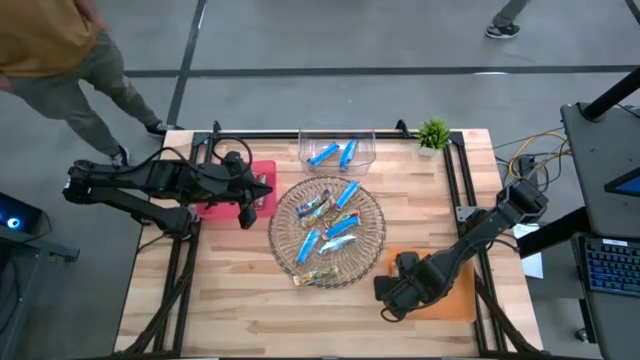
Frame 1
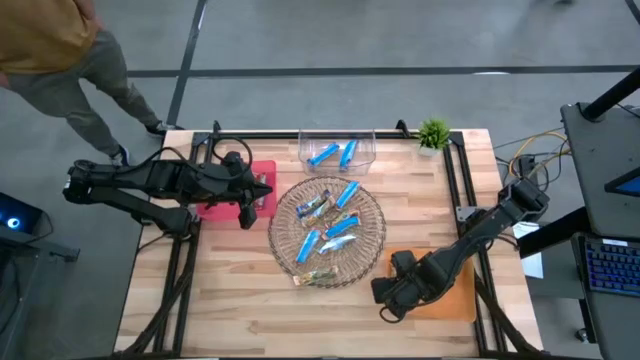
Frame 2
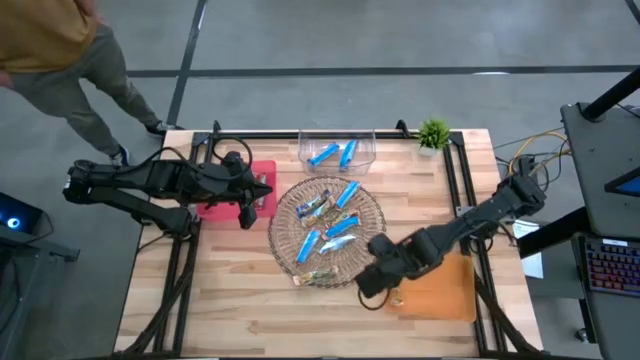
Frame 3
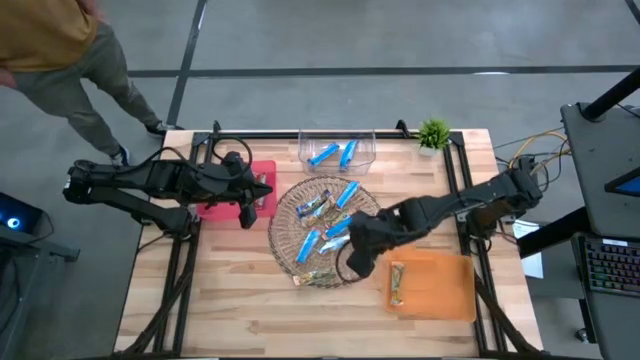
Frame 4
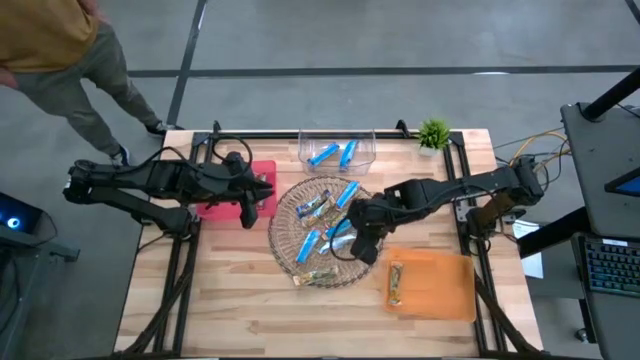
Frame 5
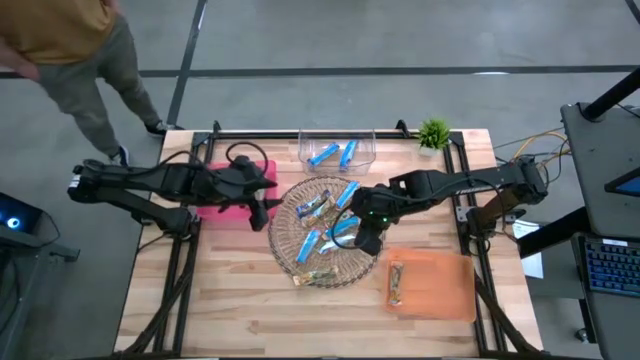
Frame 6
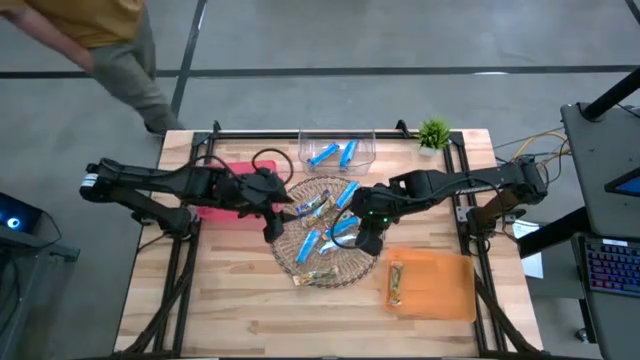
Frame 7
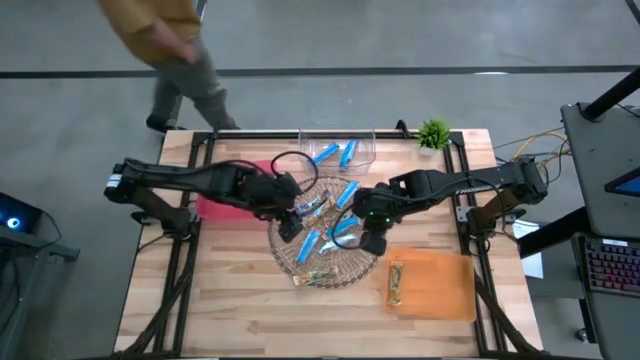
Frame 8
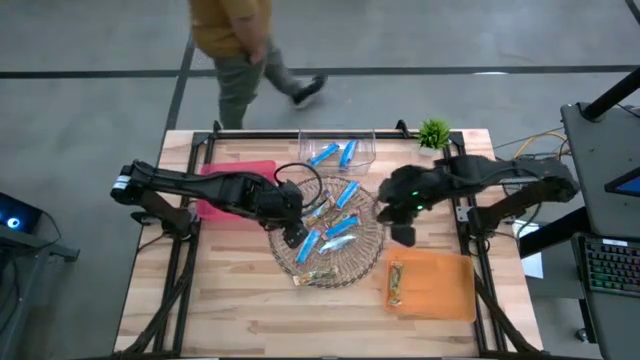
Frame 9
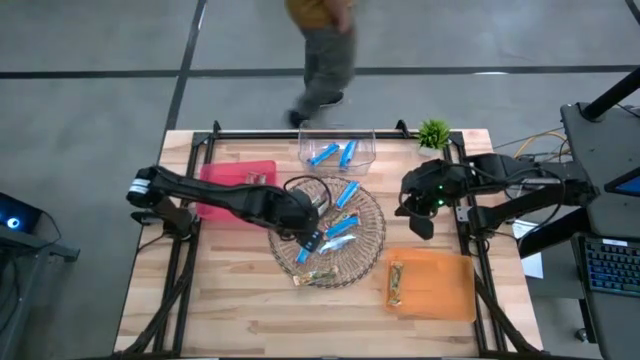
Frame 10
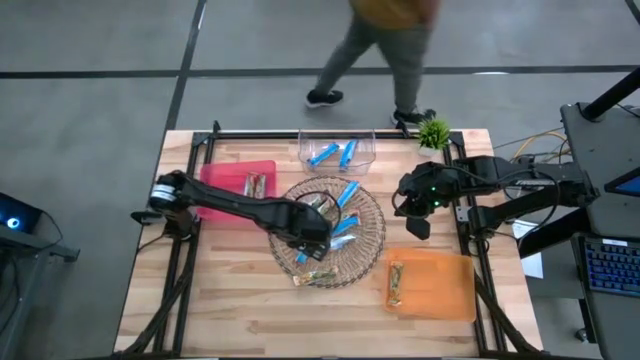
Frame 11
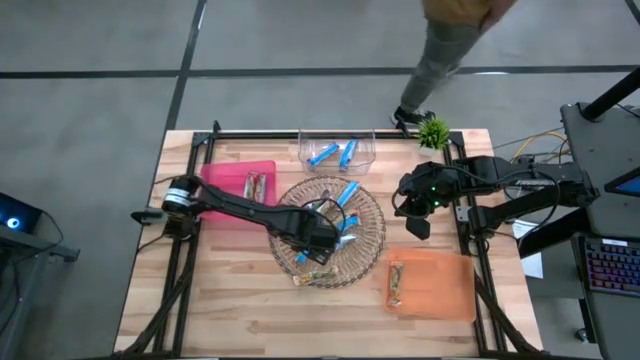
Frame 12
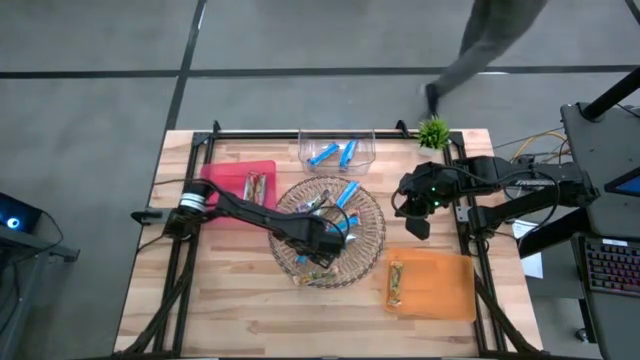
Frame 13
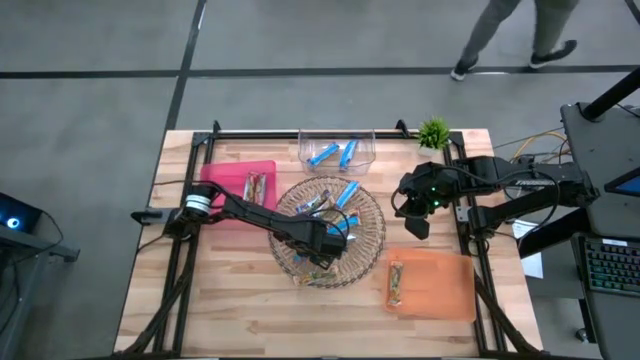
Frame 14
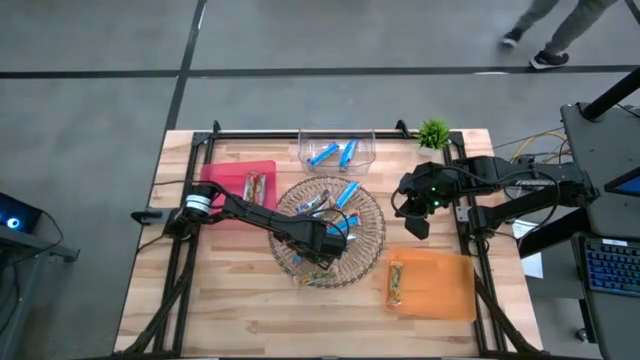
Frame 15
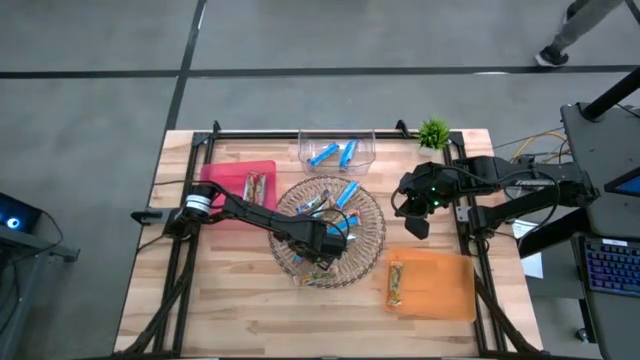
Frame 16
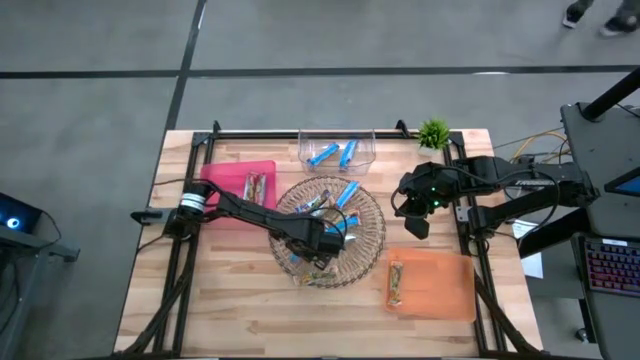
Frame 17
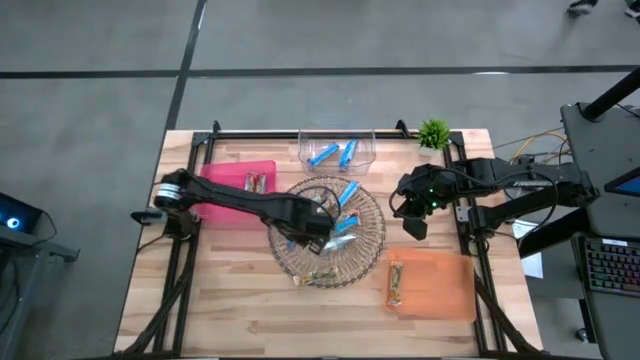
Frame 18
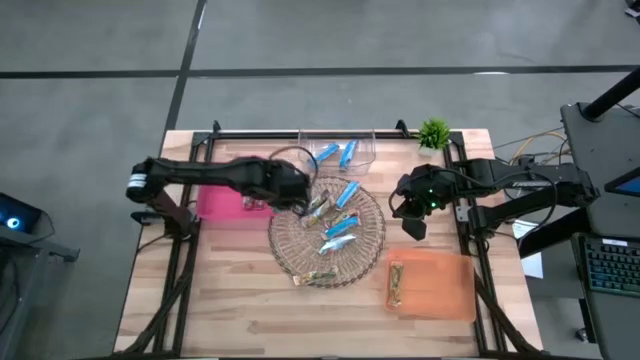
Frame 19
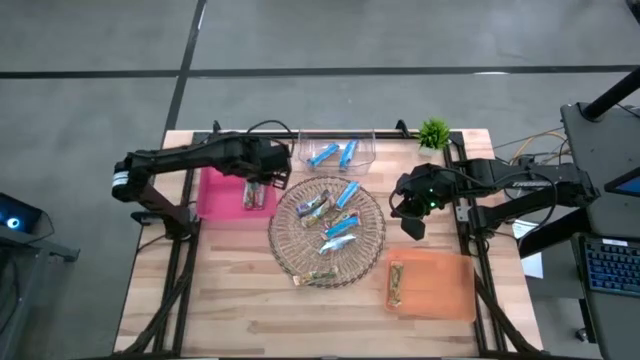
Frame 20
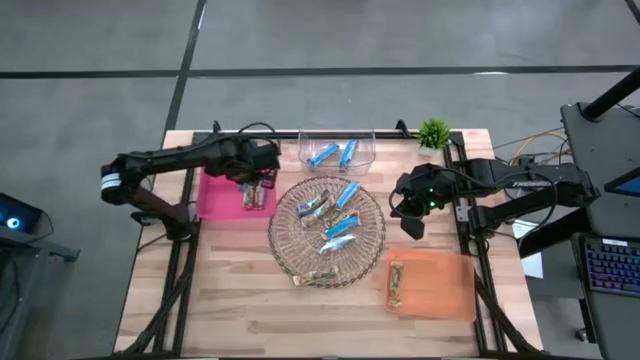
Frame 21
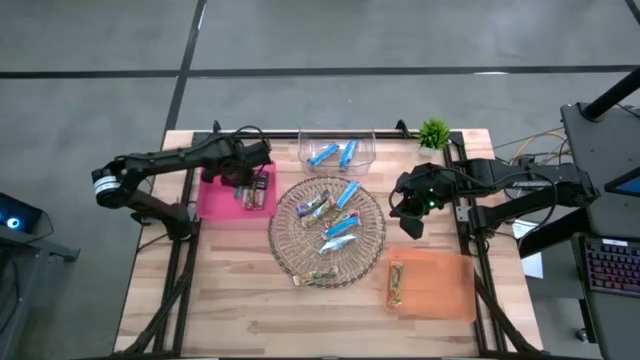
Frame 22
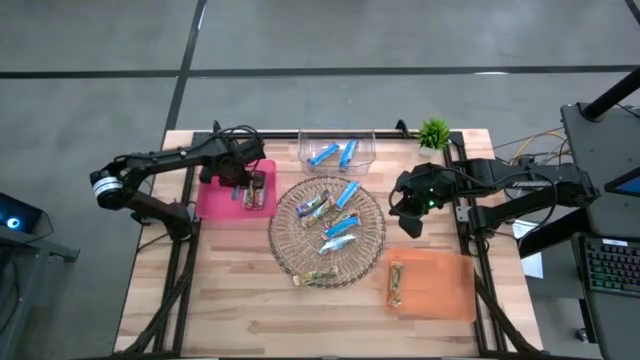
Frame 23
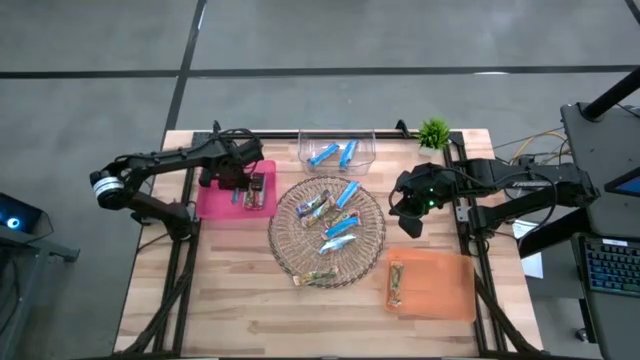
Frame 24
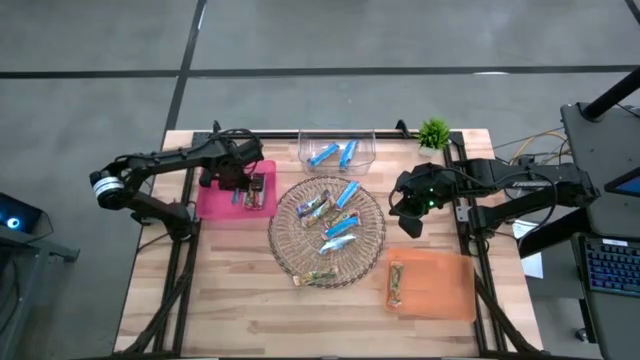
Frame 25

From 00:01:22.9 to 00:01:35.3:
Task: Pick and place Granola Bars by type
Put the red granola bar into the red bin

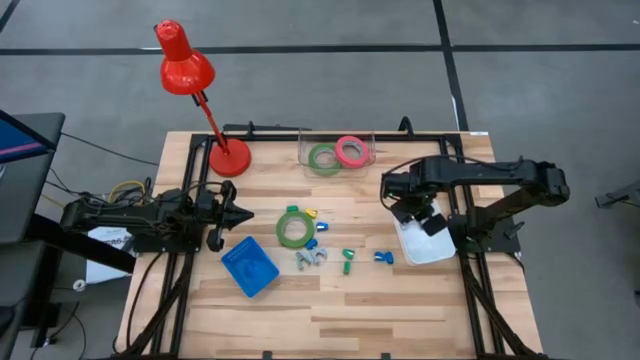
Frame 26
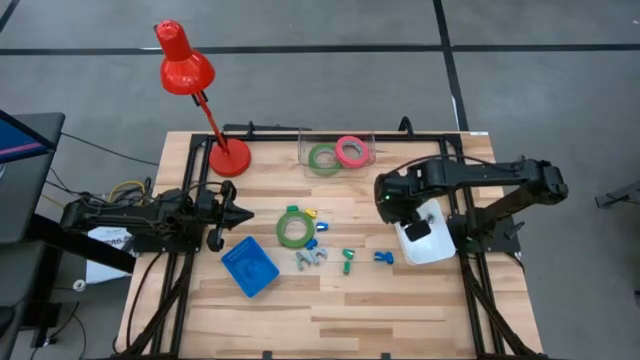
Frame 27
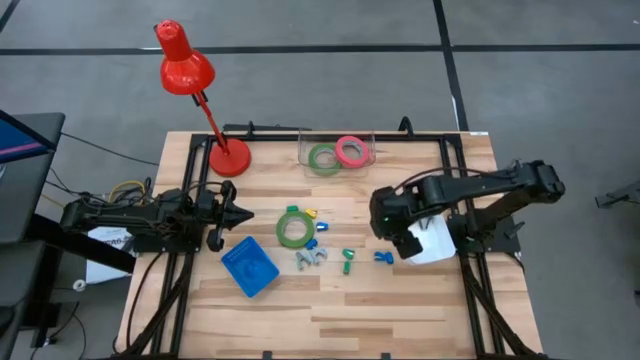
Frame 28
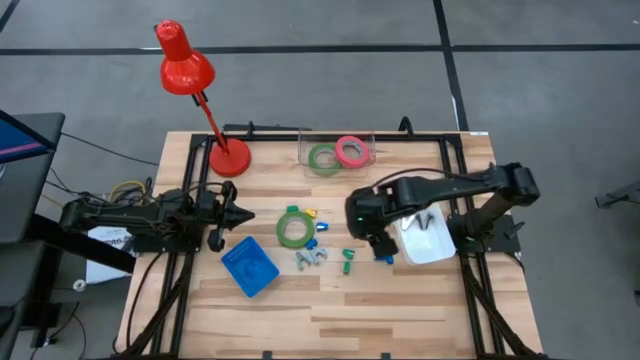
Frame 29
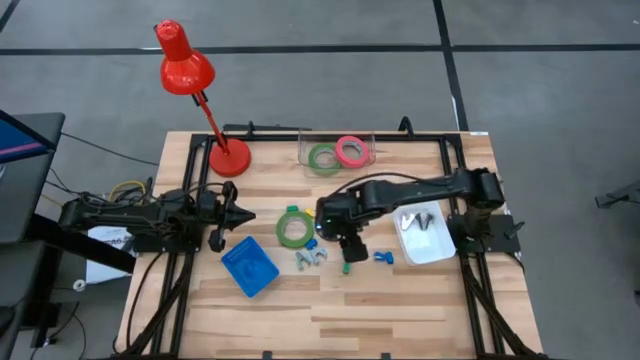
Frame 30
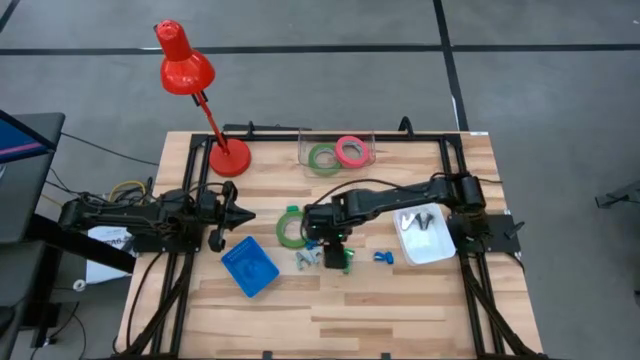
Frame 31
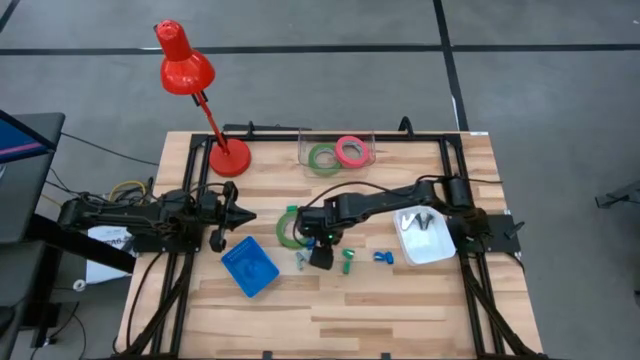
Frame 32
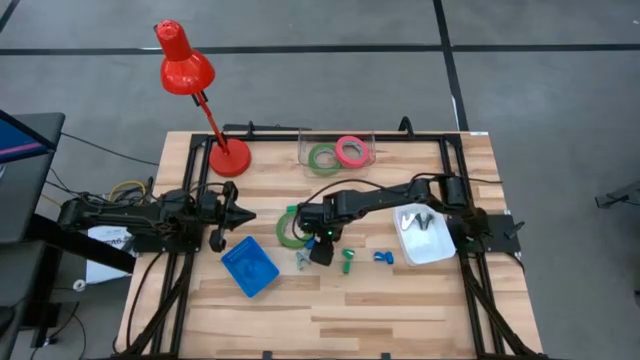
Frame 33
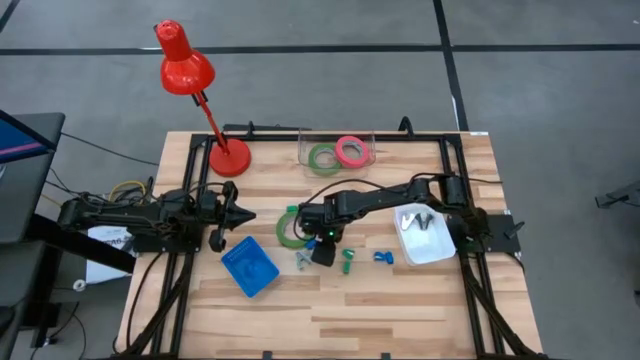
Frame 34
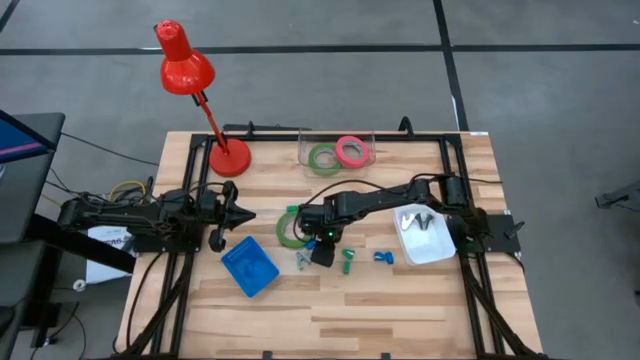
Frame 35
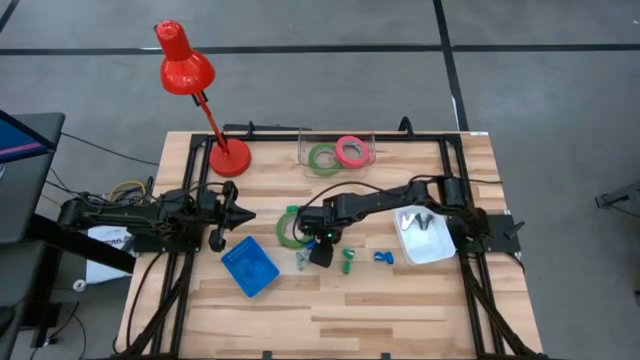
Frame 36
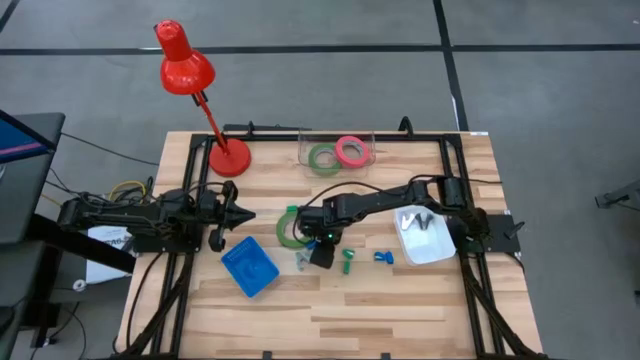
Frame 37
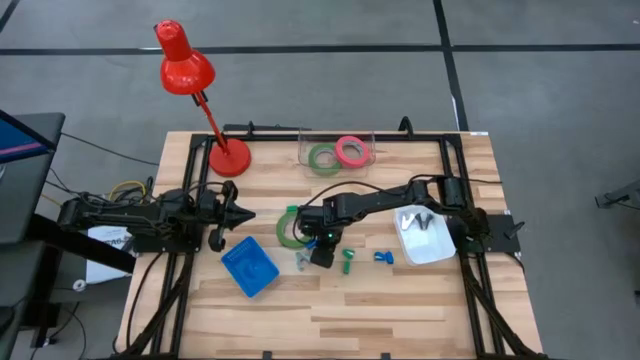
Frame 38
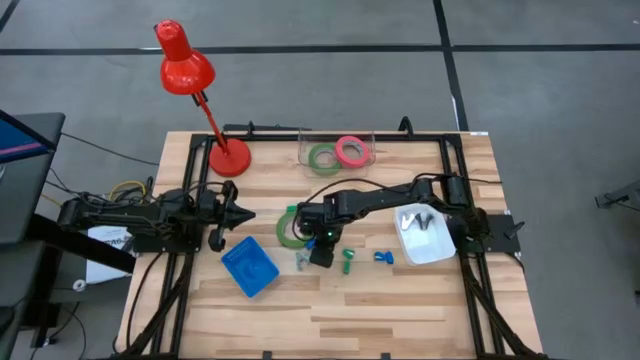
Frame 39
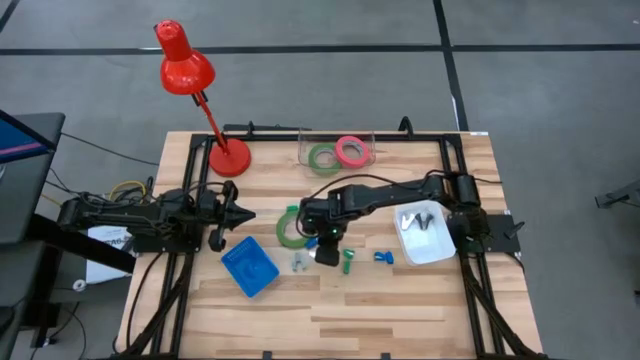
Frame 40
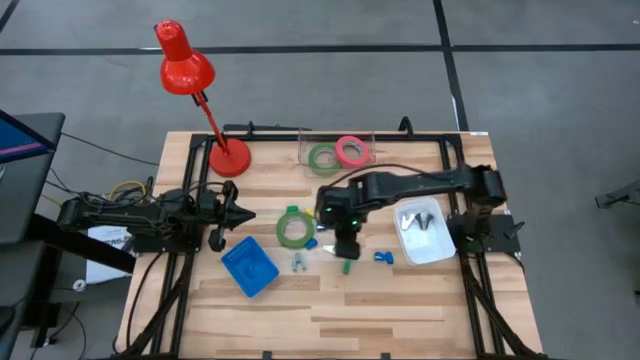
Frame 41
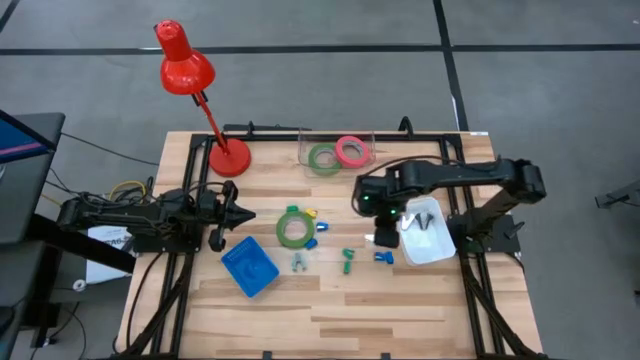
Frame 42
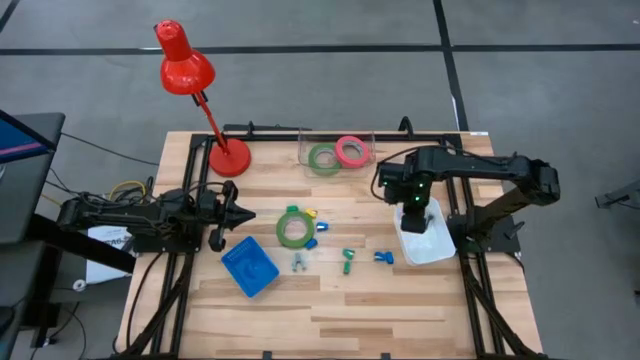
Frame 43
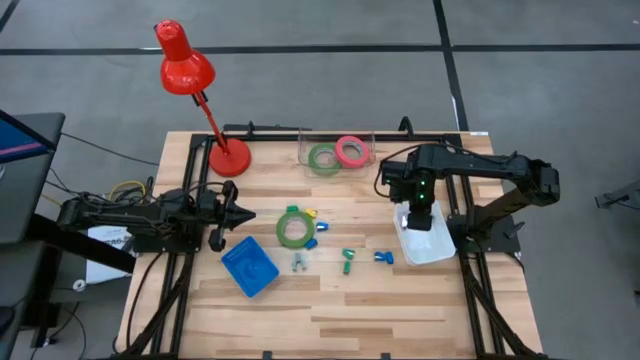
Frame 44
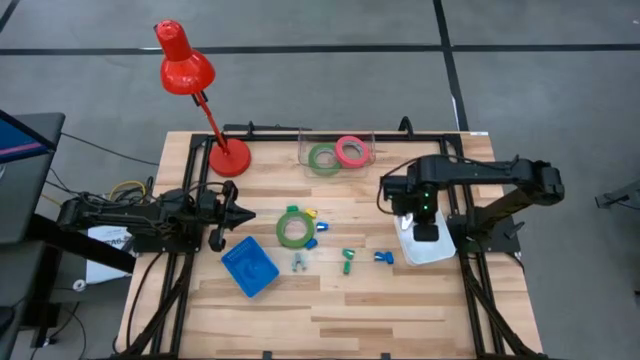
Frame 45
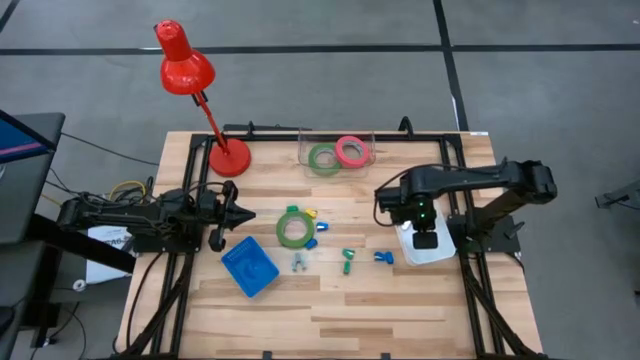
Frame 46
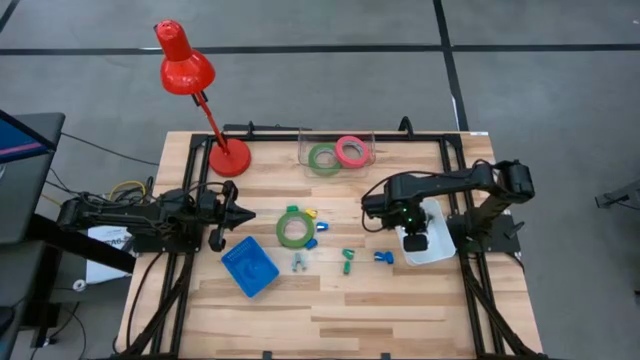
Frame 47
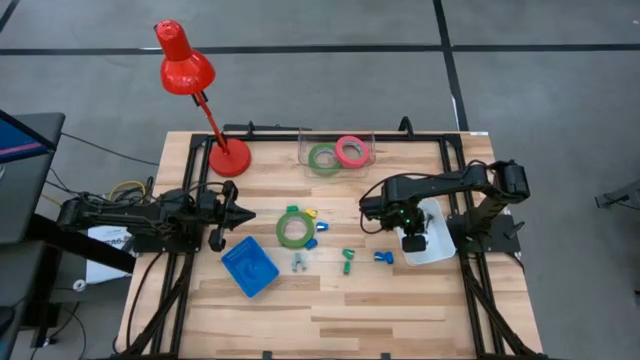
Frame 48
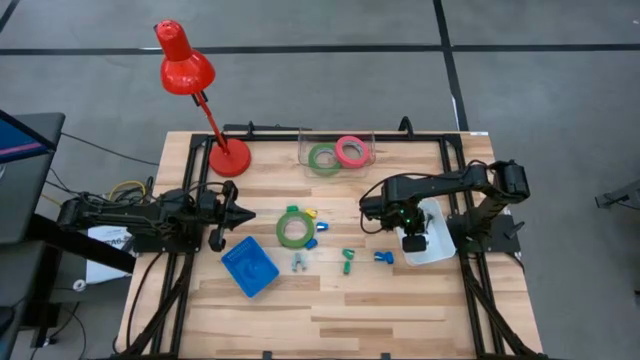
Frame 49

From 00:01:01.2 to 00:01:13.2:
Task: Pick and place Stapler, Stapler remover, tape
Put the gray stapler remover into the white bin
